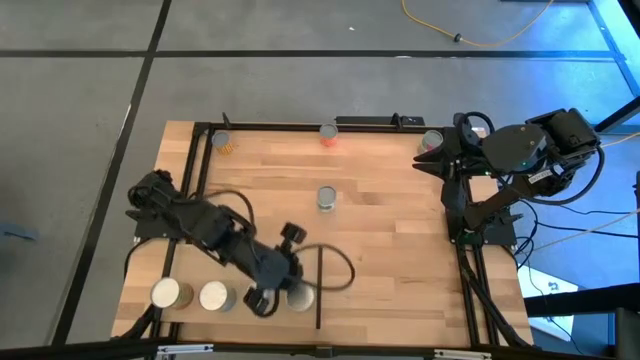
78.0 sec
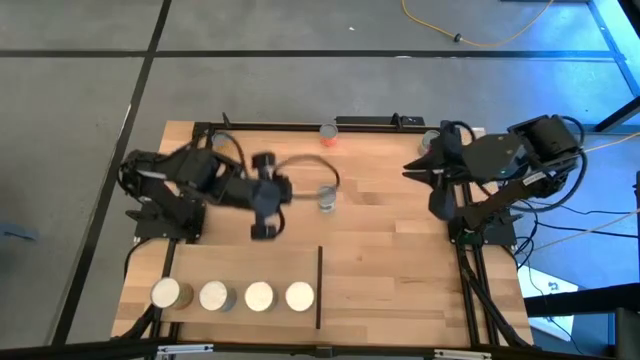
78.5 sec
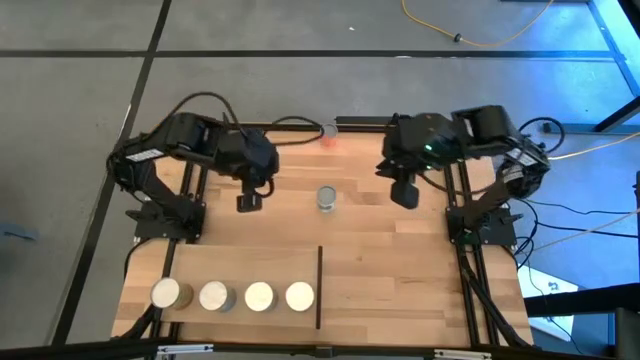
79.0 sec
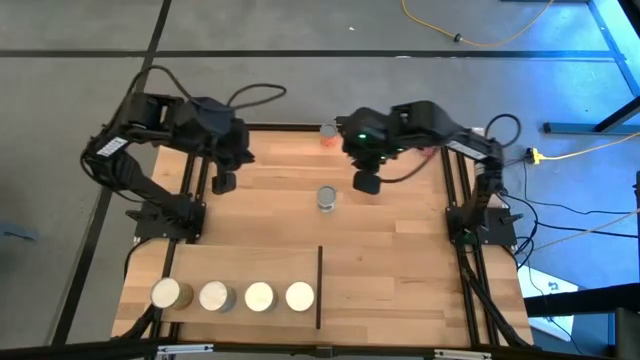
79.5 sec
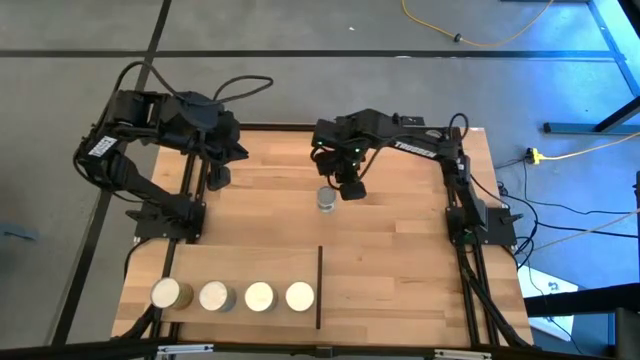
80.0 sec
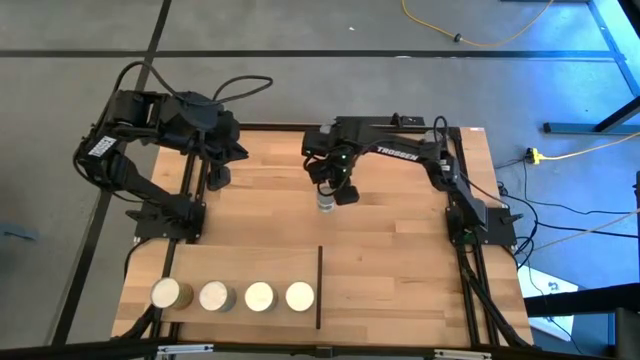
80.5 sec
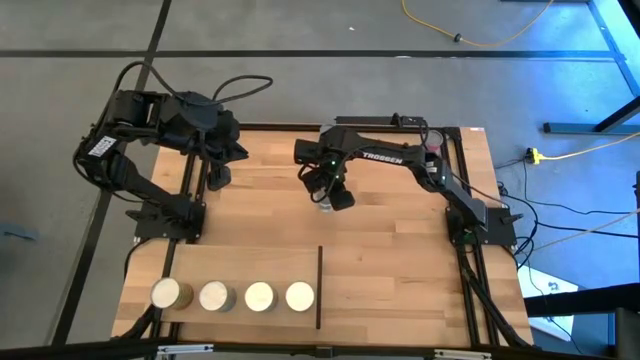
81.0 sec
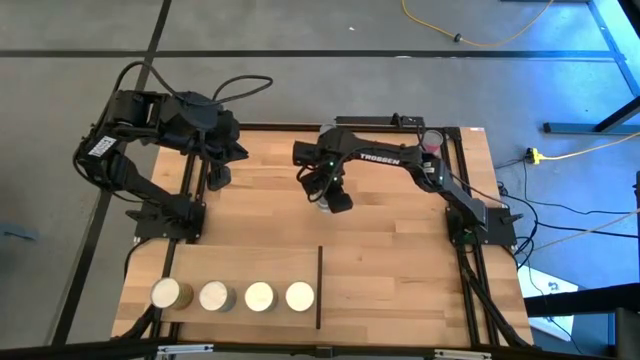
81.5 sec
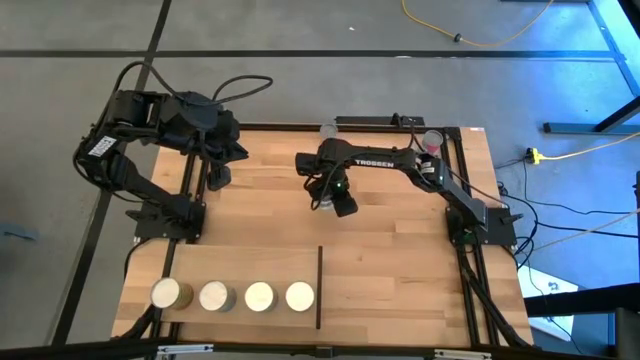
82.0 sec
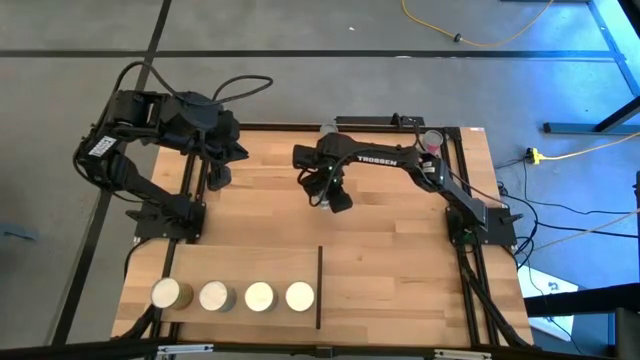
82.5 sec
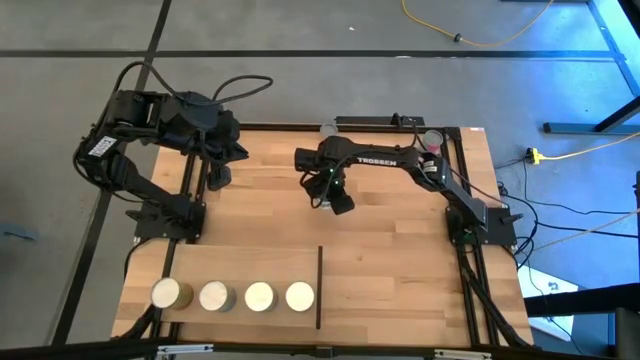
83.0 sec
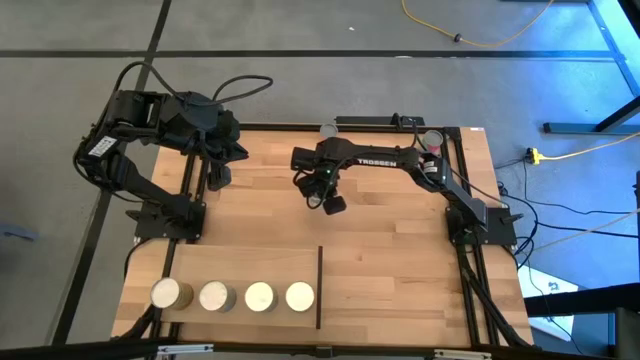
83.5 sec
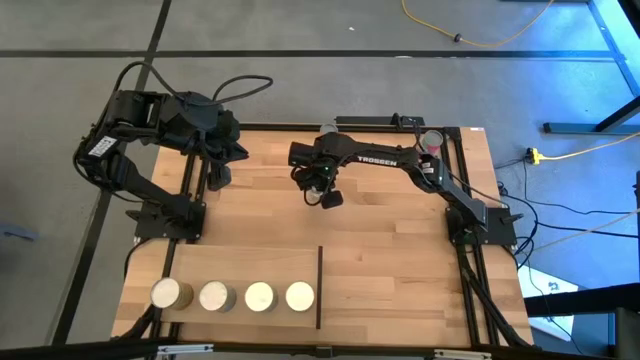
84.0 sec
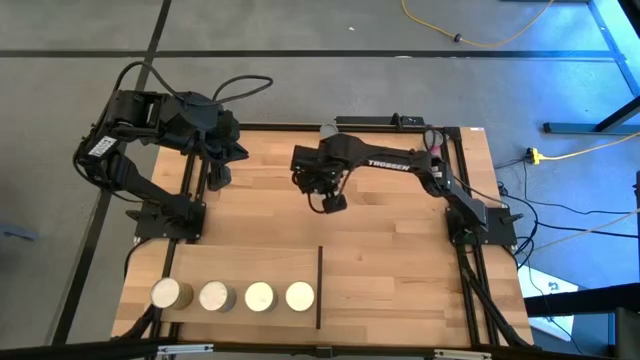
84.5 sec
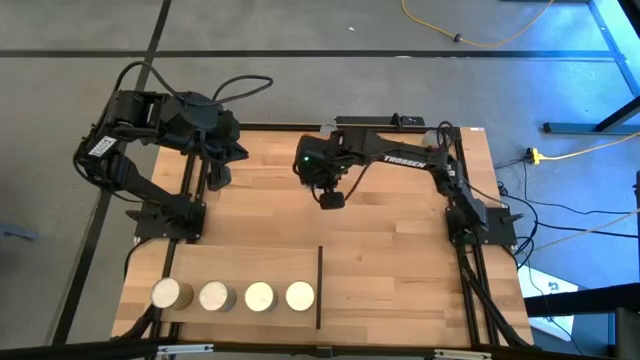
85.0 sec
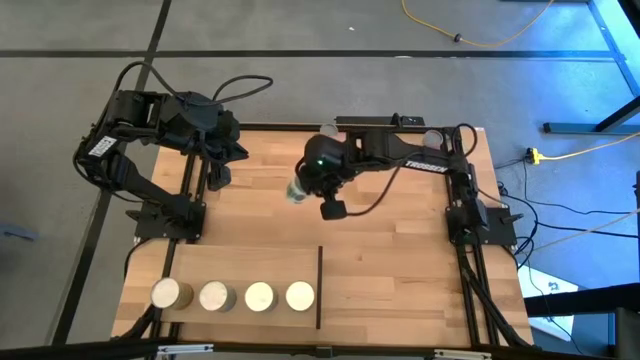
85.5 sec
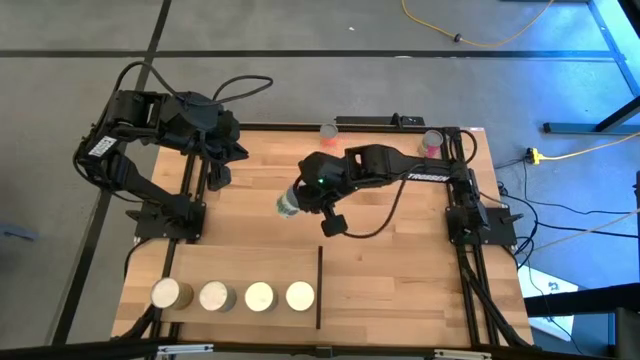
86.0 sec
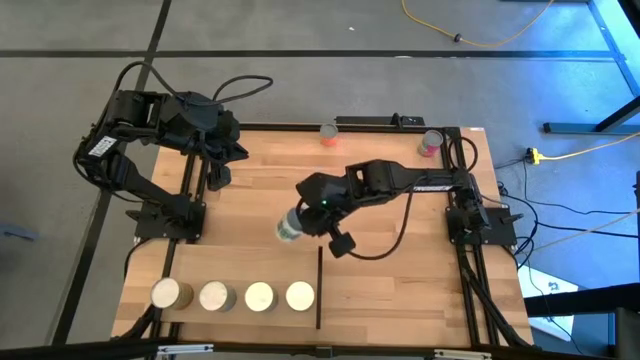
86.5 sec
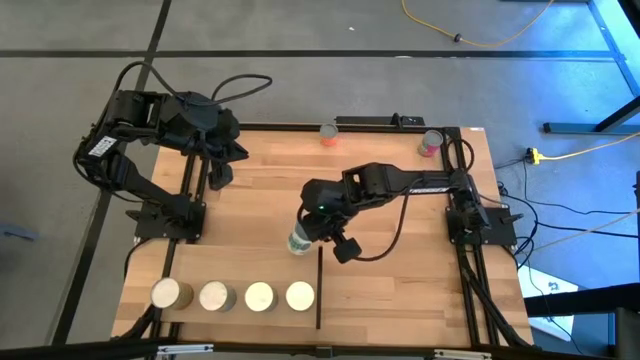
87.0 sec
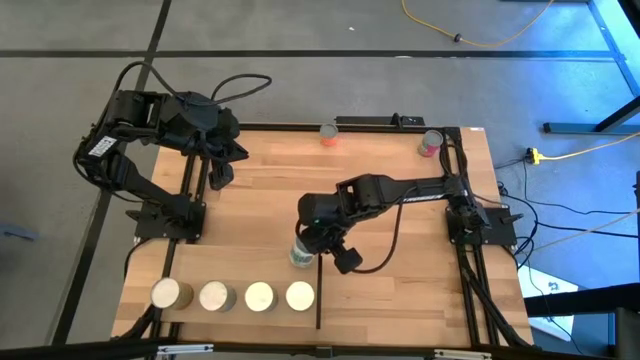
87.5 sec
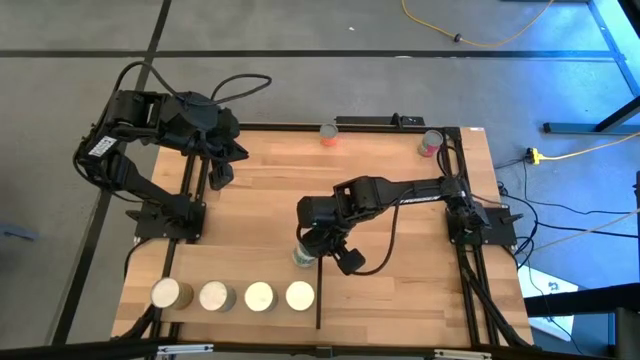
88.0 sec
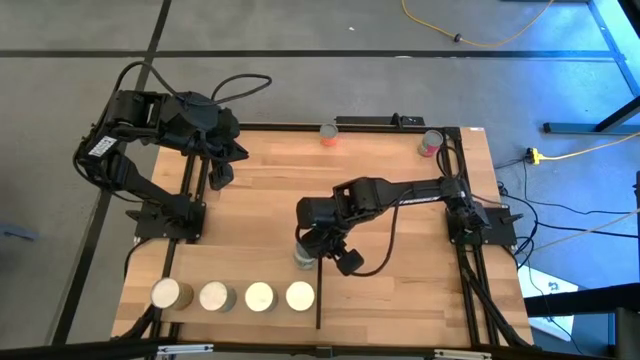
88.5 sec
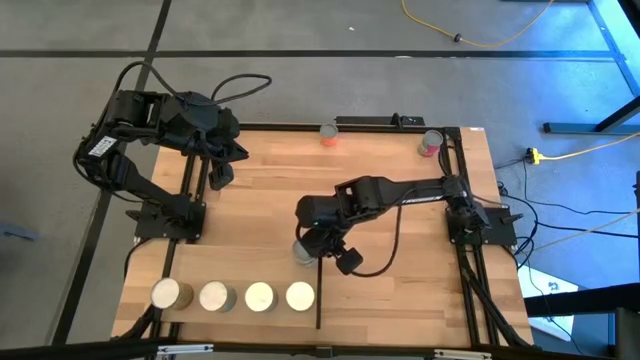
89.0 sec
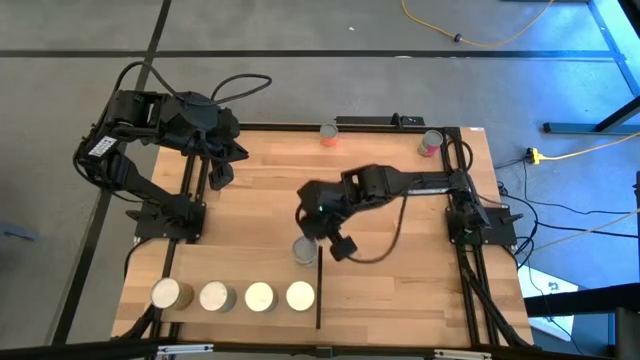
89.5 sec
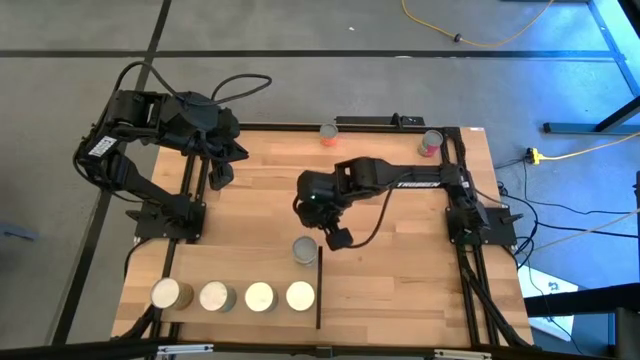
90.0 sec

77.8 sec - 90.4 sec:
Task: Pick and place cans onto a shelf
Put the canned mixed vegetables on the shelf

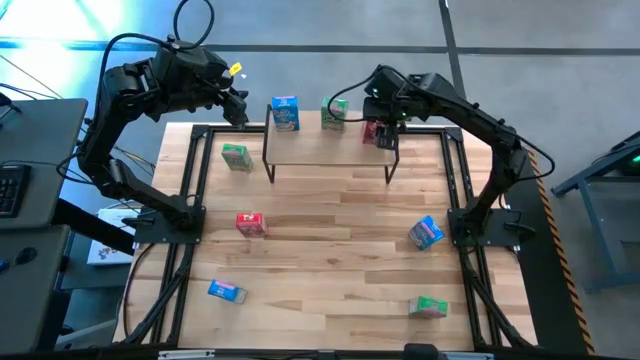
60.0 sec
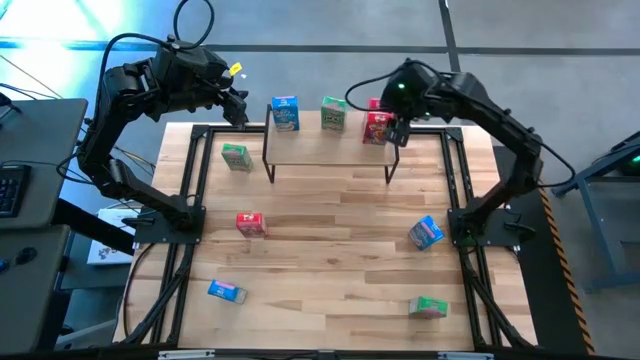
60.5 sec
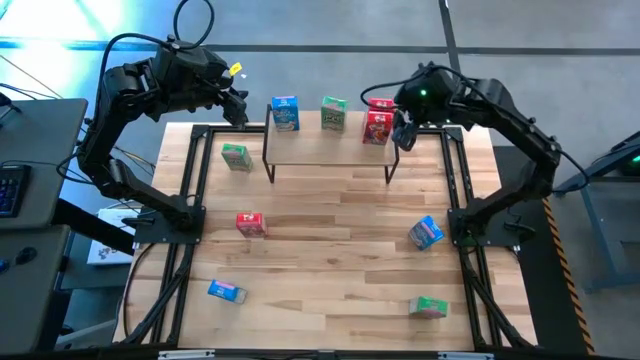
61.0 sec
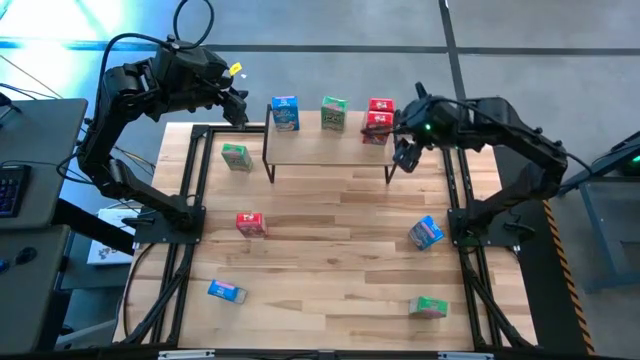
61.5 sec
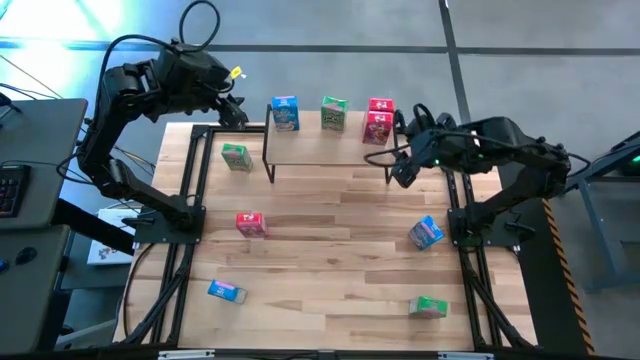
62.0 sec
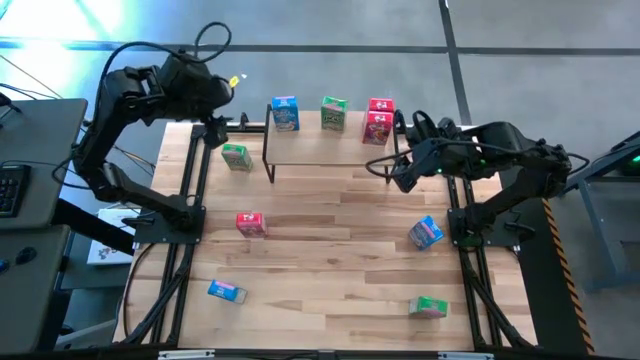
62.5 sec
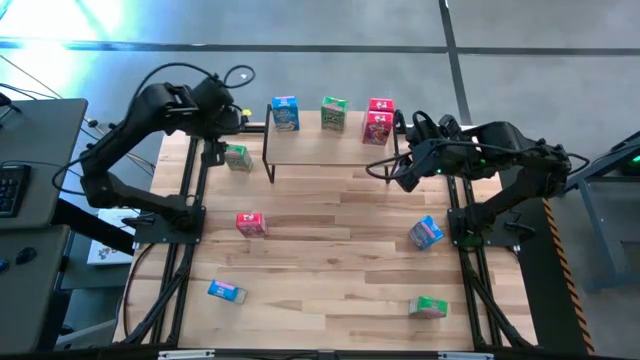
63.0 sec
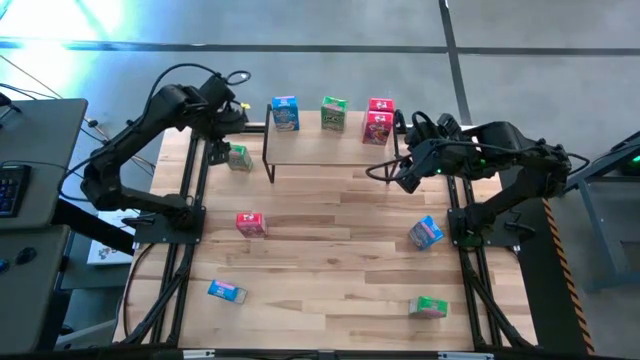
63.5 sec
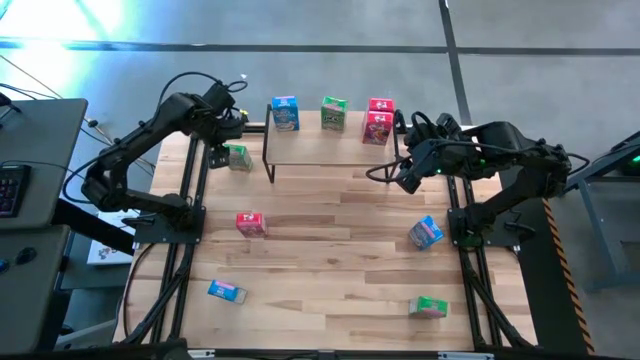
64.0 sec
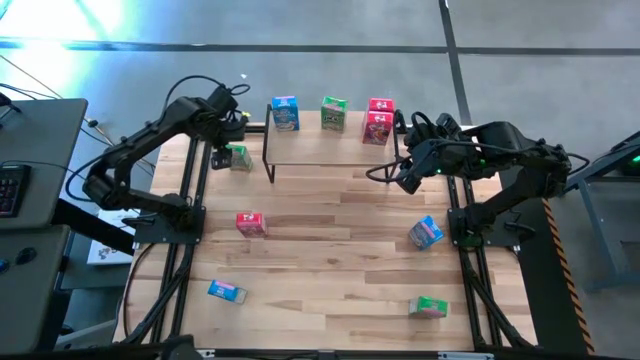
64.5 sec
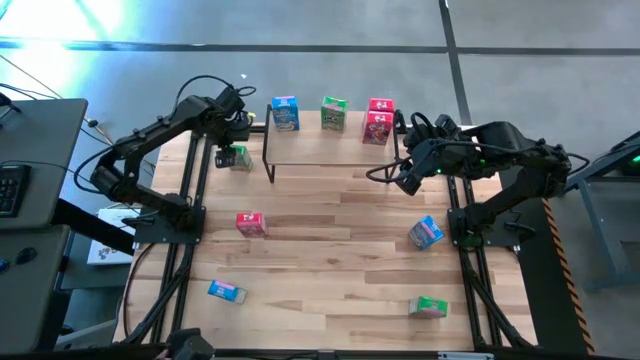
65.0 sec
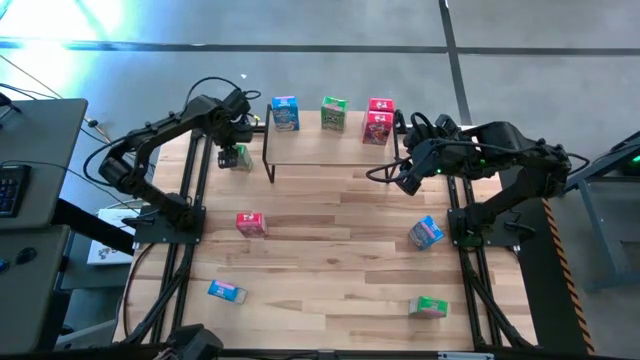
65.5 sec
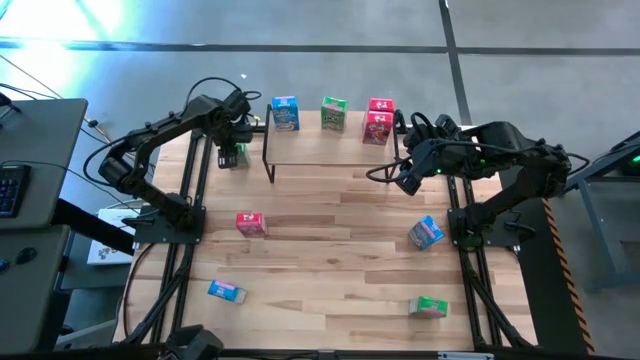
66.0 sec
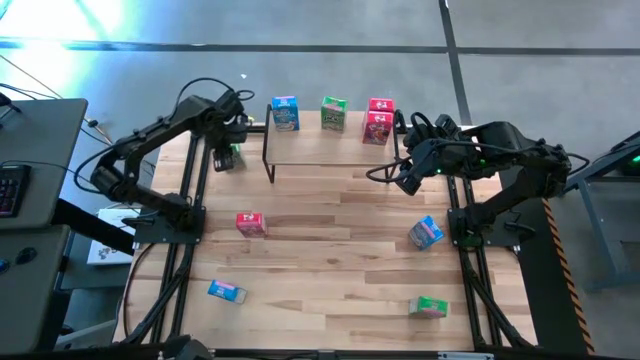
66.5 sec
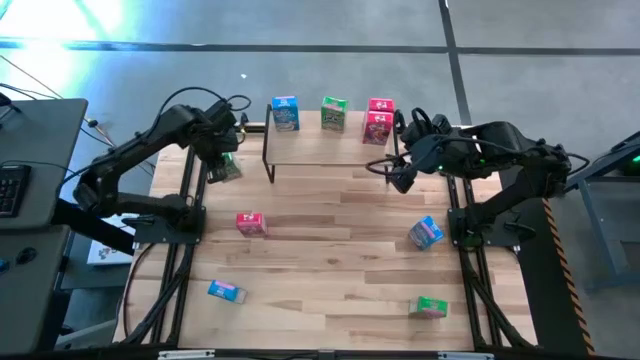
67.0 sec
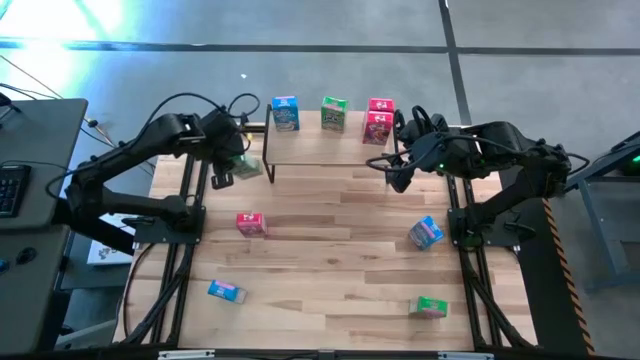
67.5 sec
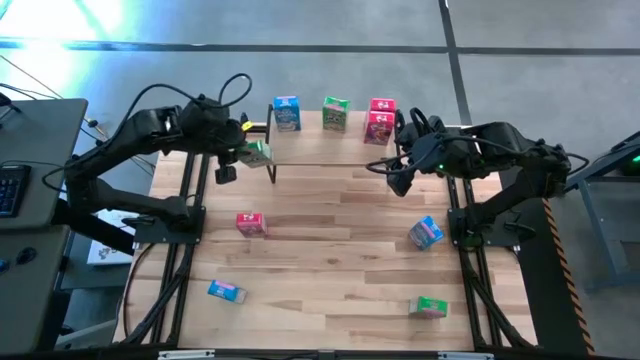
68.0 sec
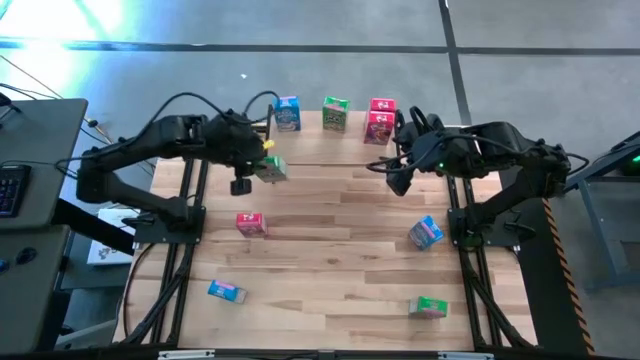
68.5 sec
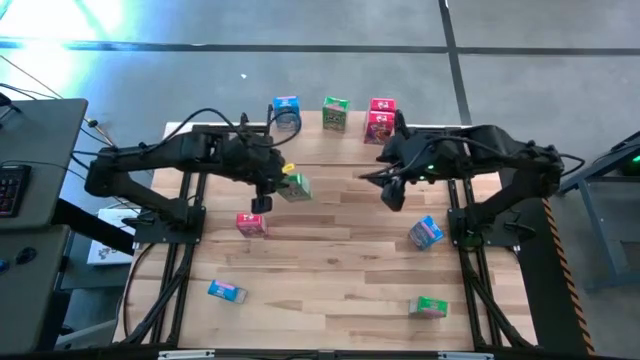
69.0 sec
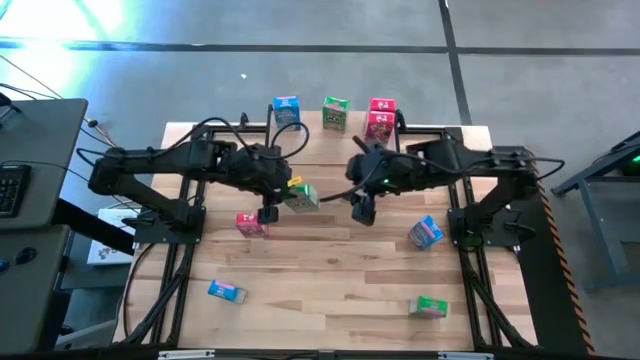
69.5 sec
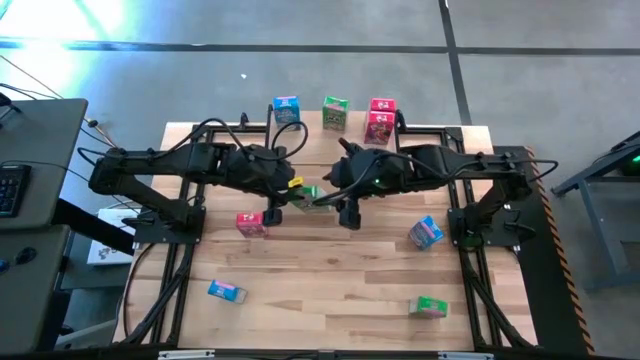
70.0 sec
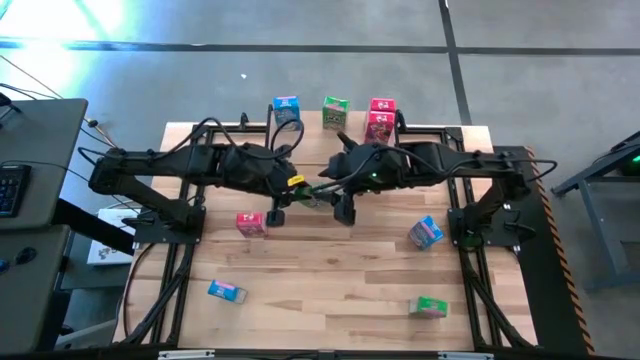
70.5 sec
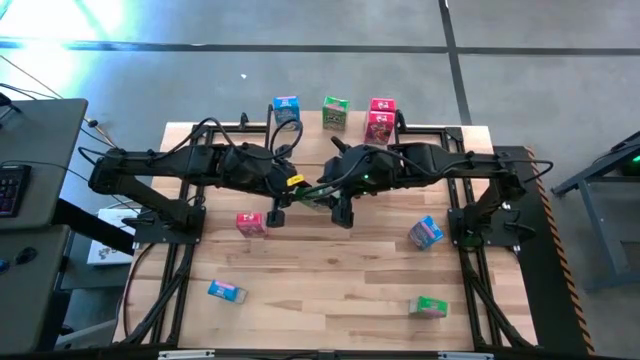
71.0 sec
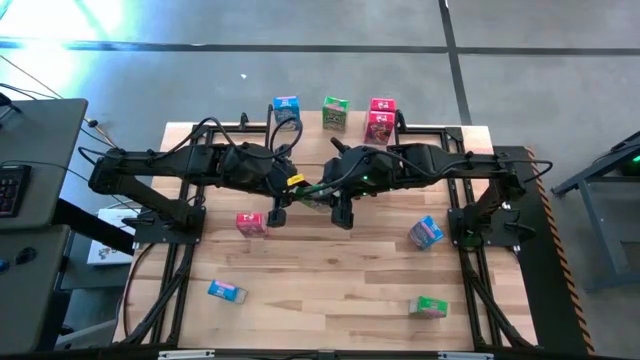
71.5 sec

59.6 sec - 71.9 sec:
Task: Stack cereal on shelf
Put the top green cereal box aligned with the other green cereal box on the shelf
